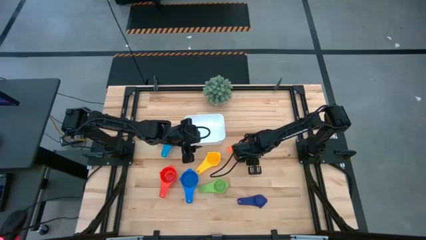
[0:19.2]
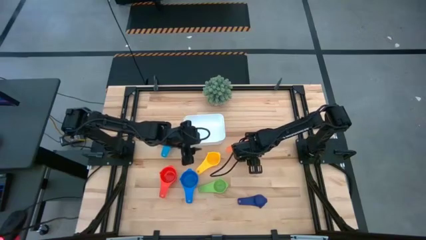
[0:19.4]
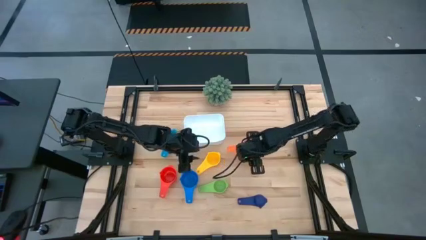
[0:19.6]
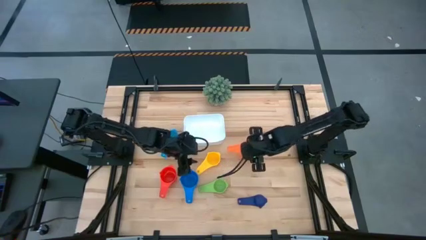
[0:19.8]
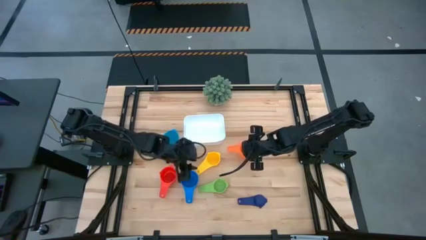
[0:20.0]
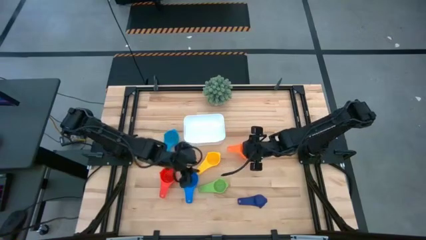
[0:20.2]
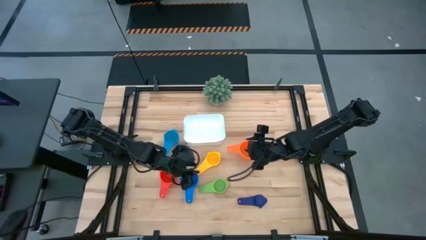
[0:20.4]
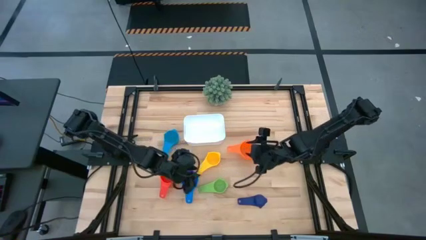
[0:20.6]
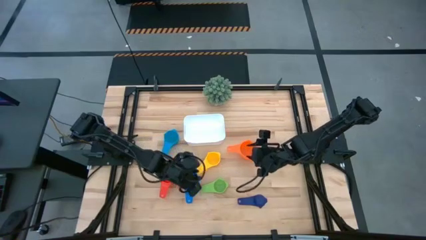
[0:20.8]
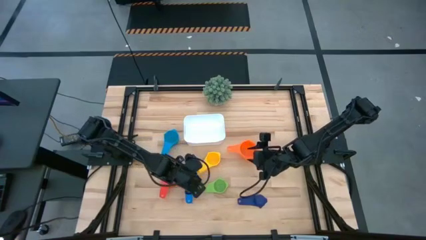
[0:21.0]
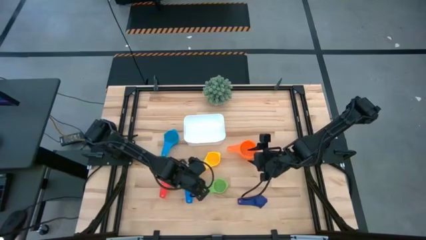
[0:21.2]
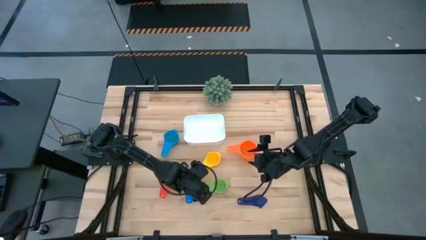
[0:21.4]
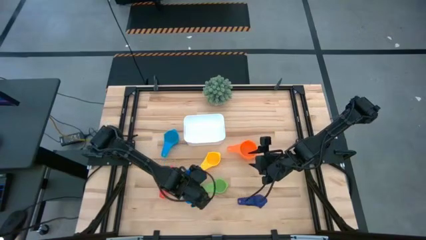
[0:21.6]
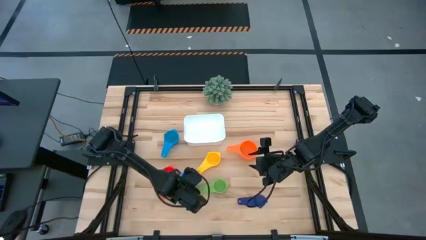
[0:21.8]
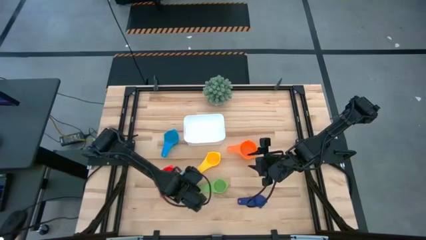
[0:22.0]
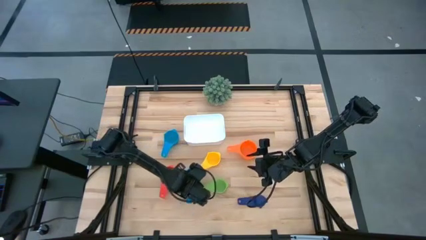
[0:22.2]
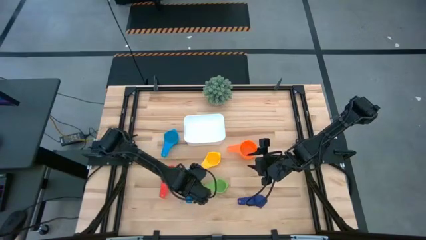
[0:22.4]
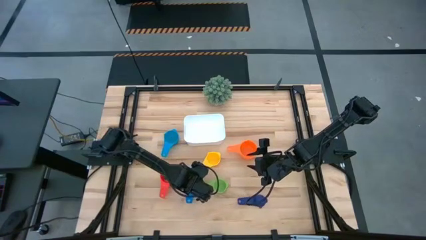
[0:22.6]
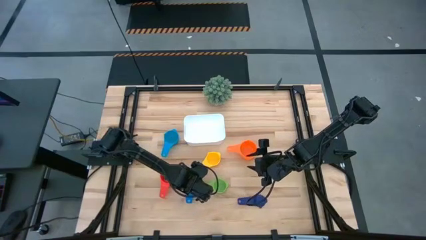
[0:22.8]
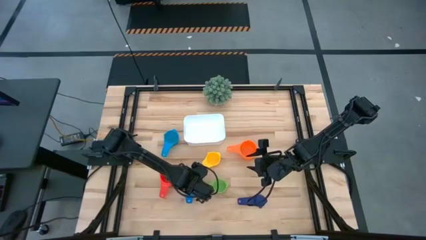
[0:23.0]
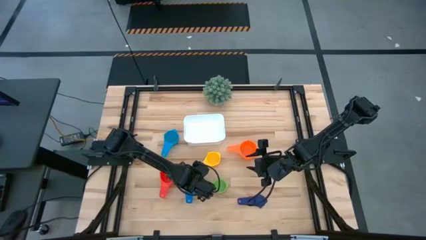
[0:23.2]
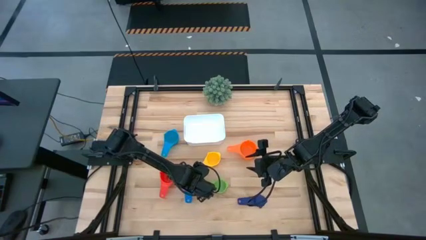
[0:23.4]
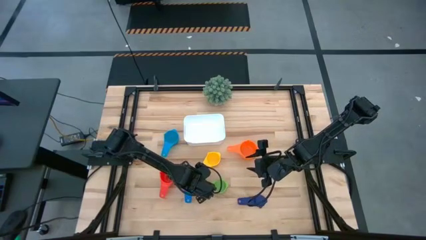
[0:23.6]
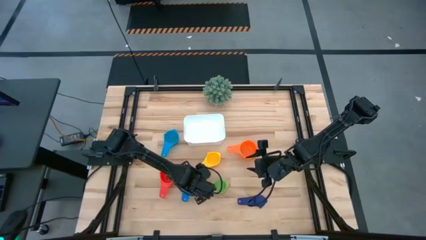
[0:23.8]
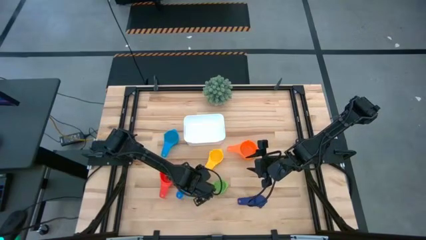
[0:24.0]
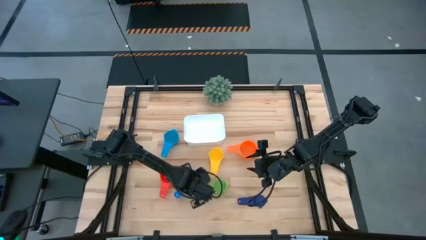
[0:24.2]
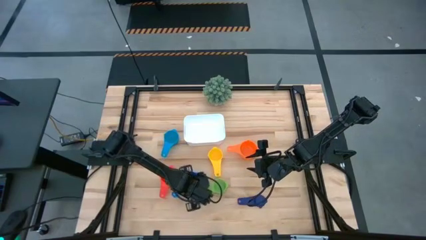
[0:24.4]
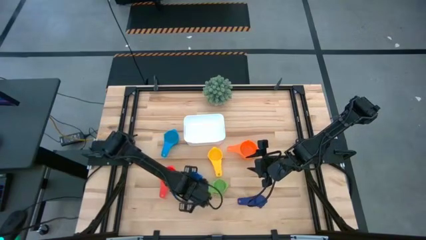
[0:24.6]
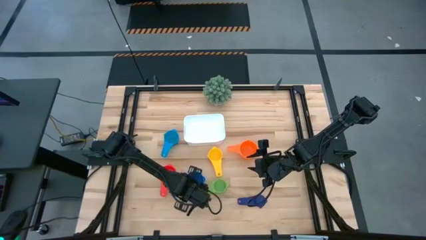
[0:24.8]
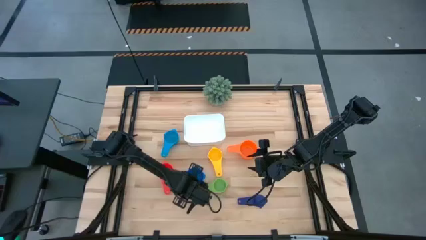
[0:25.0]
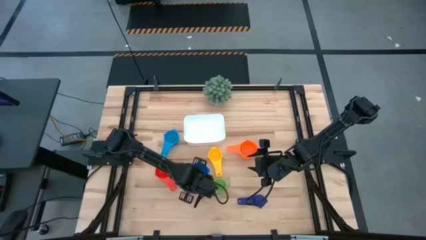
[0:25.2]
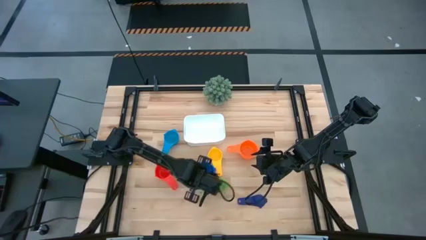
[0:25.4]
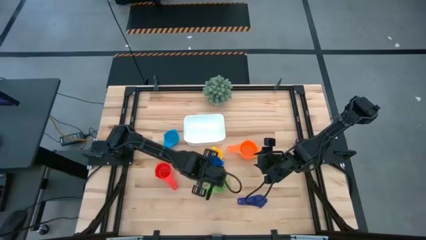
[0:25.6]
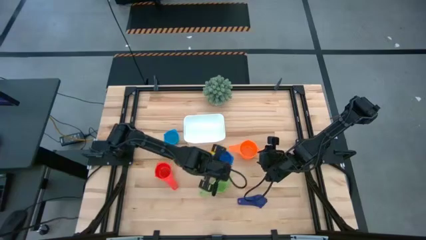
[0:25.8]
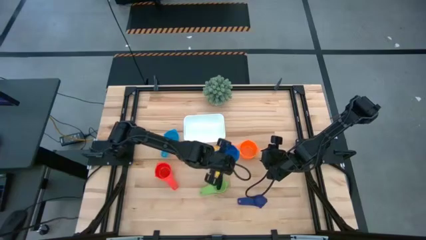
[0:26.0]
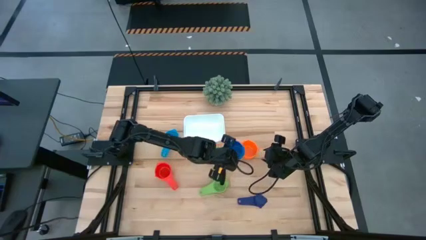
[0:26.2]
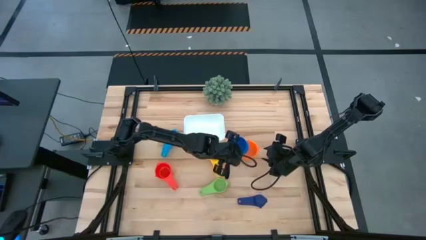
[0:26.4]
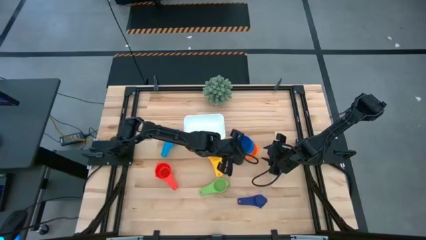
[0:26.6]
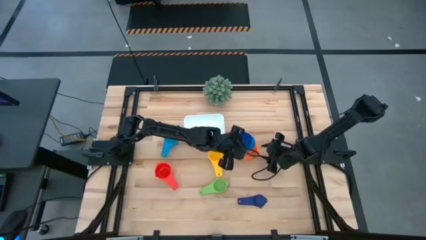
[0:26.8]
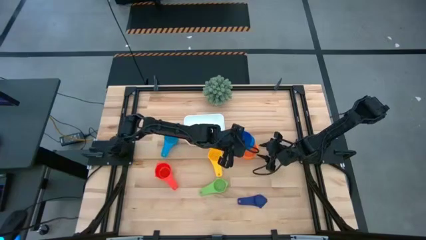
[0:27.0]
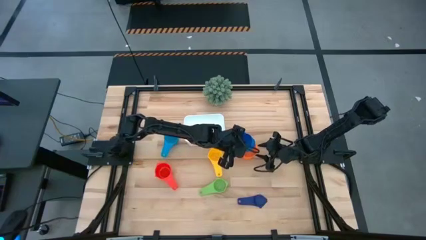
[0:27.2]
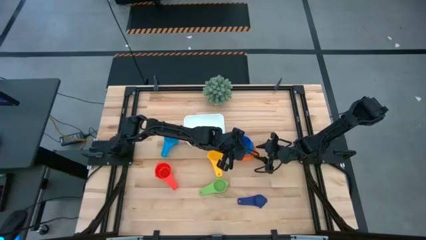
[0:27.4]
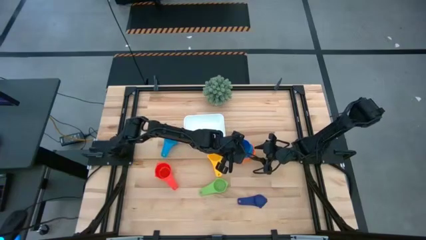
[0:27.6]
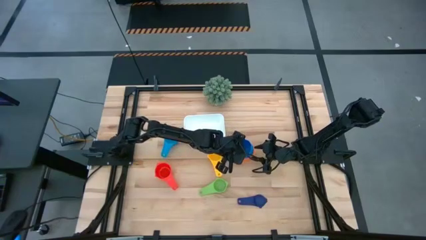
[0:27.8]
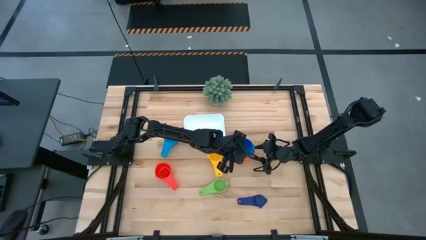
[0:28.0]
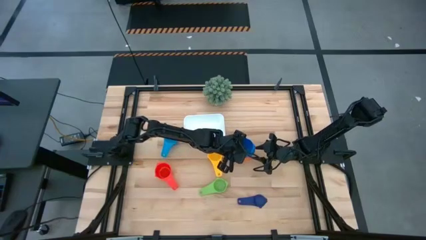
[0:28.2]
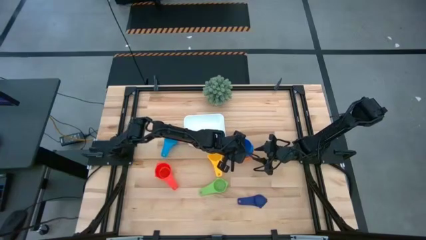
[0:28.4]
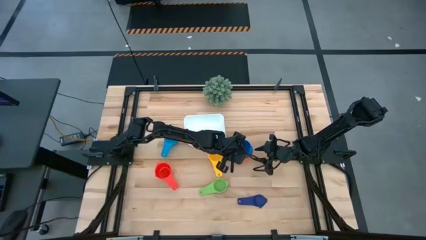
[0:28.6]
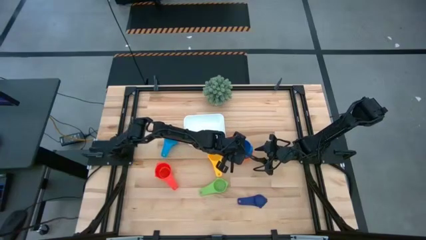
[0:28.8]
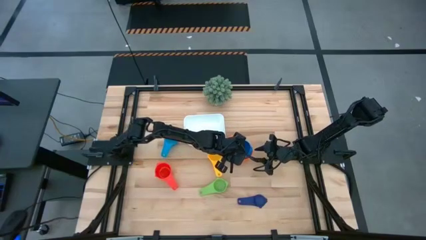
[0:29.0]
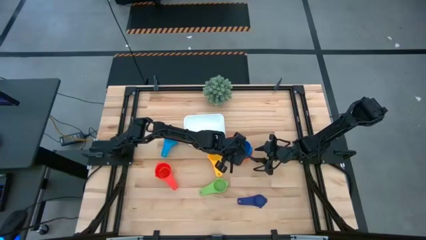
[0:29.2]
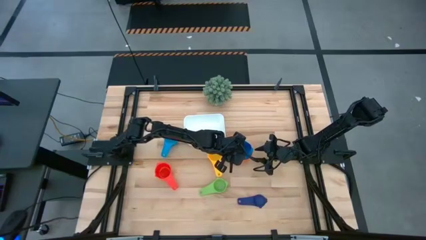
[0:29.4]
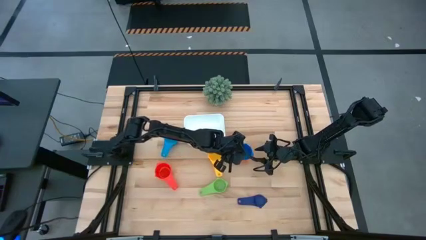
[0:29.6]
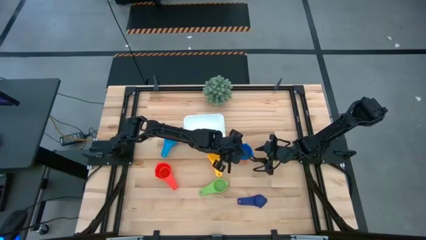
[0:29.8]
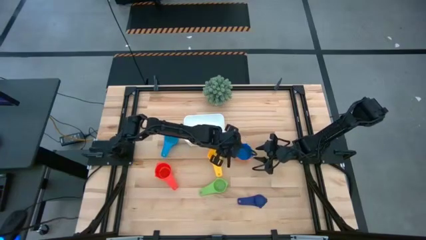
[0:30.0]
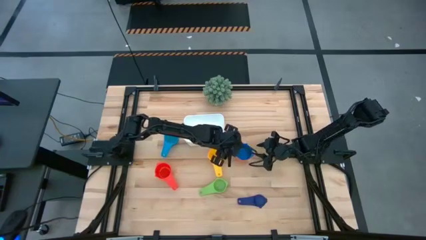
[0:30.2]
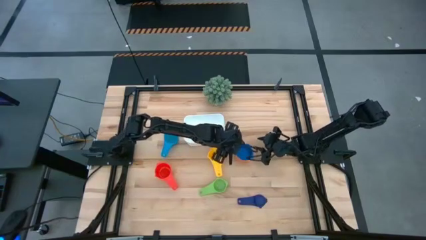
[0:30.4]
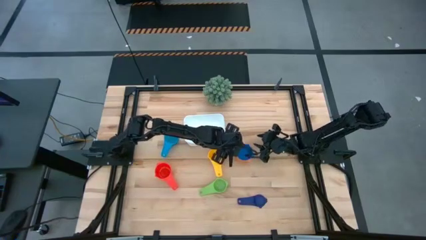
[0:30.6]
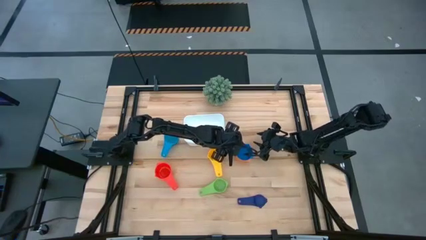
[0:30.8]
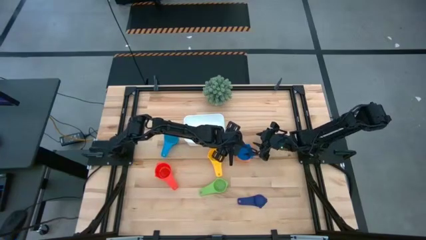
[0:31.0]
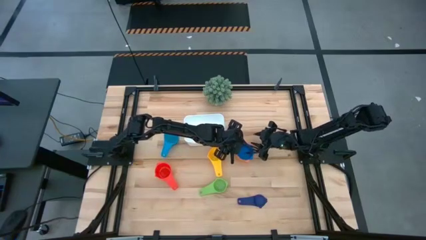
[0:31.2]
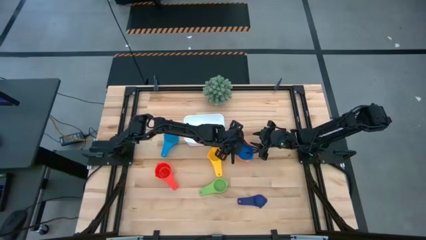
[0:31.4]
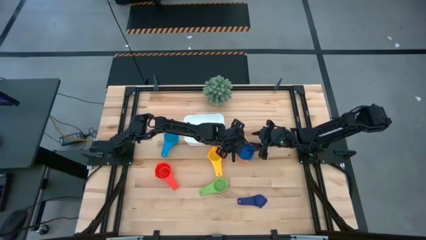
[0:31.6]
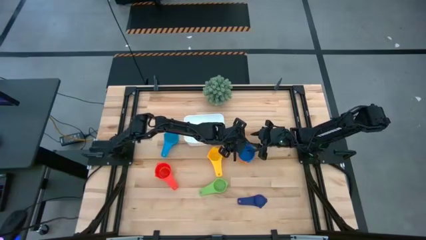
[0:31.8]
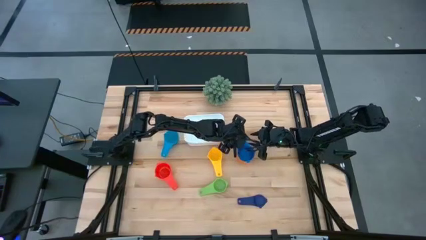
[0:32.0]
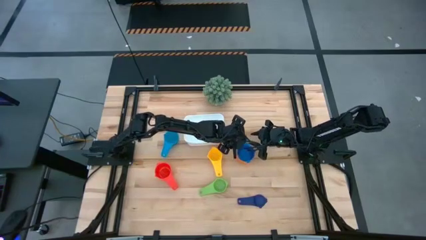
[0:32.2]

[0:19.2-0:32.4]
Task: Nest measuring cups in basket
Stack the blue nesting cup on the orange nesting cup

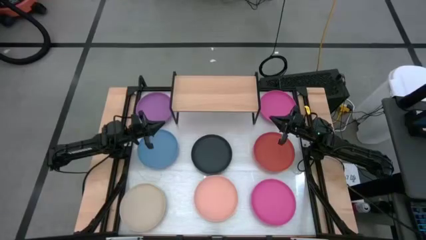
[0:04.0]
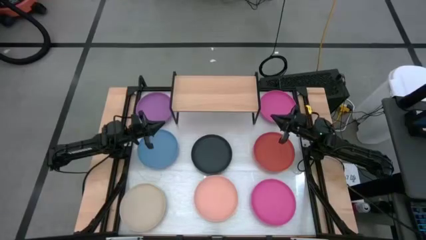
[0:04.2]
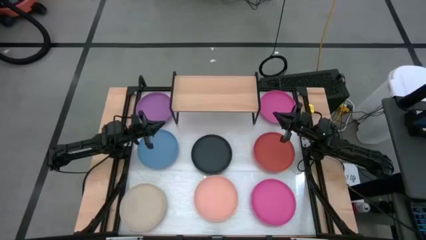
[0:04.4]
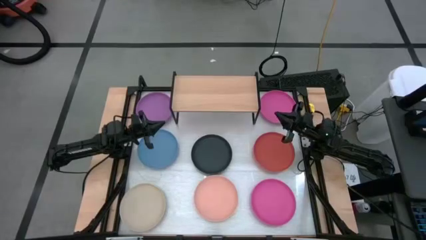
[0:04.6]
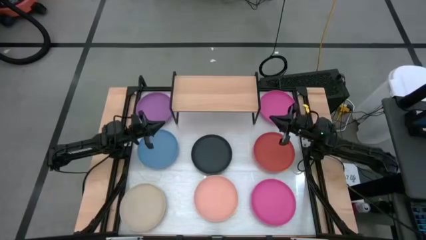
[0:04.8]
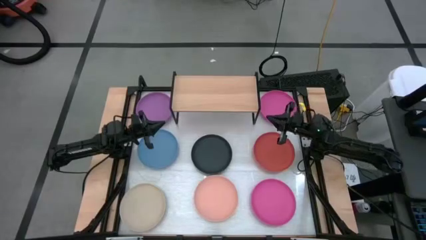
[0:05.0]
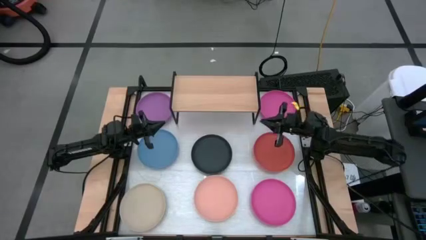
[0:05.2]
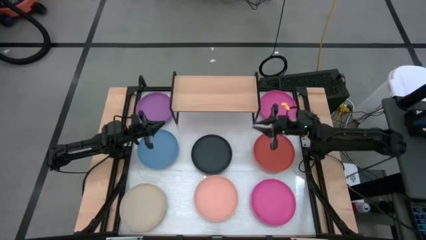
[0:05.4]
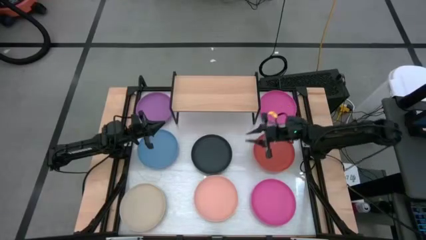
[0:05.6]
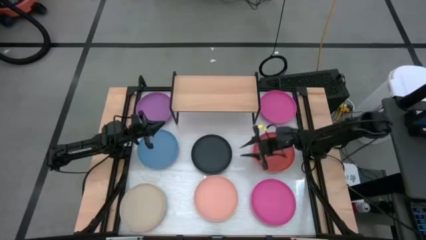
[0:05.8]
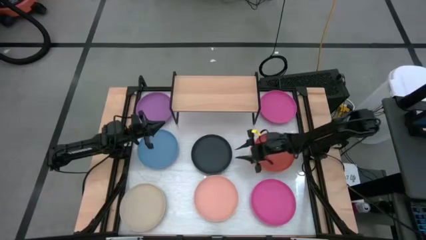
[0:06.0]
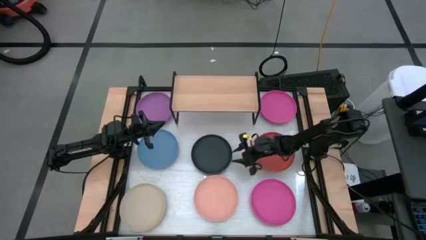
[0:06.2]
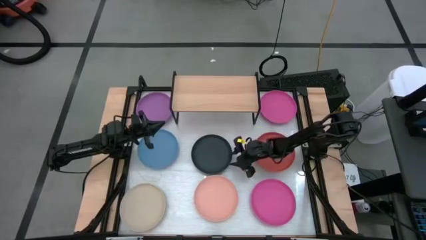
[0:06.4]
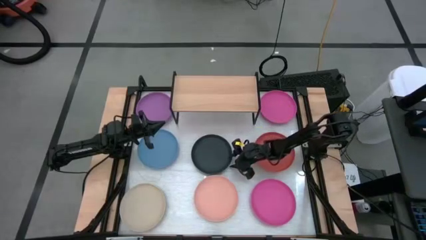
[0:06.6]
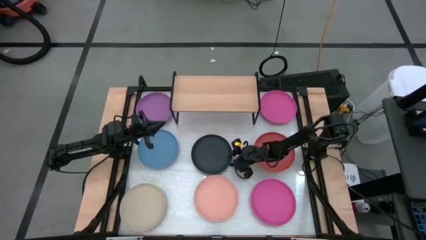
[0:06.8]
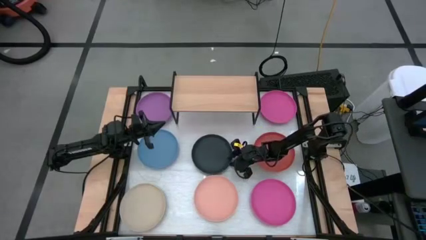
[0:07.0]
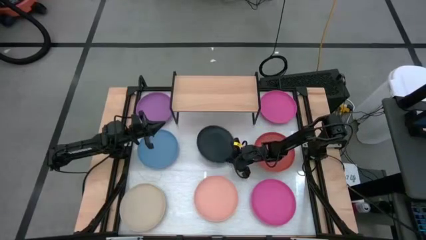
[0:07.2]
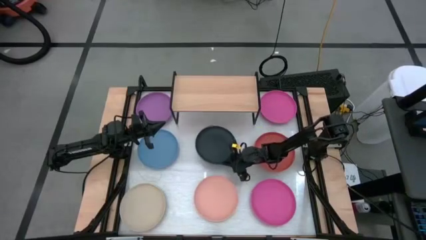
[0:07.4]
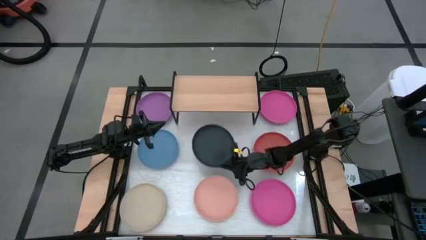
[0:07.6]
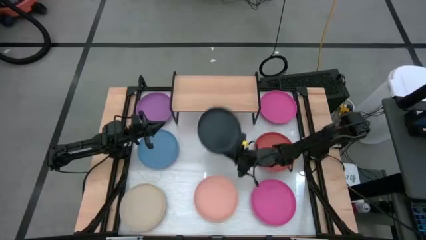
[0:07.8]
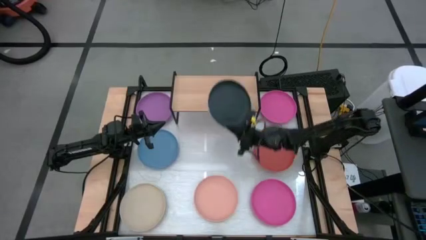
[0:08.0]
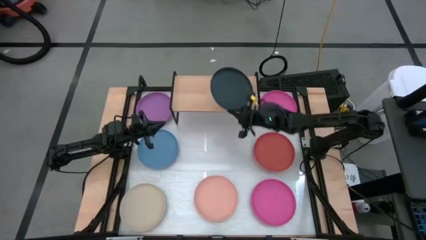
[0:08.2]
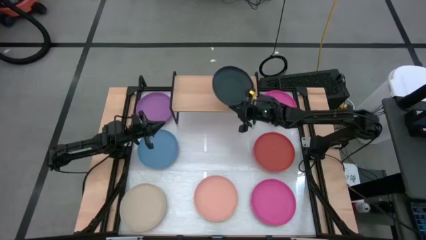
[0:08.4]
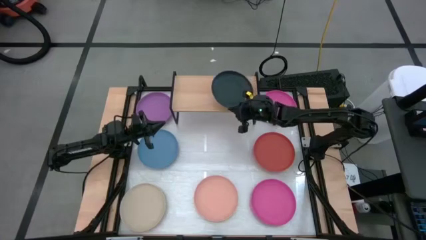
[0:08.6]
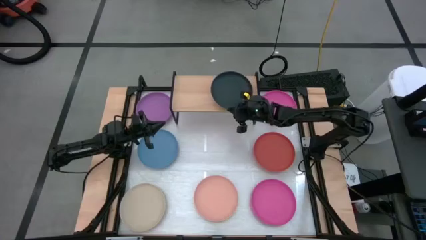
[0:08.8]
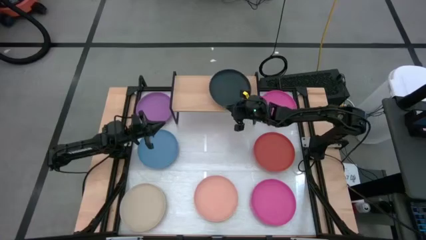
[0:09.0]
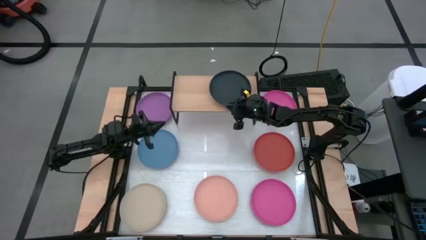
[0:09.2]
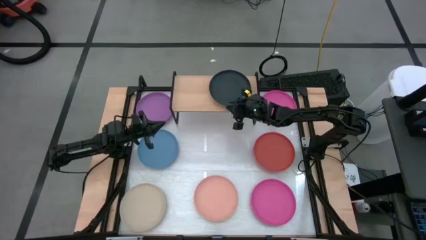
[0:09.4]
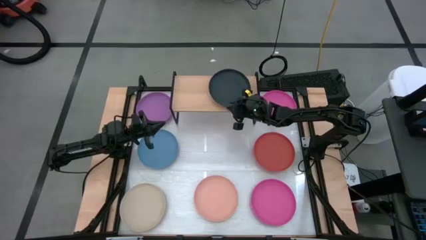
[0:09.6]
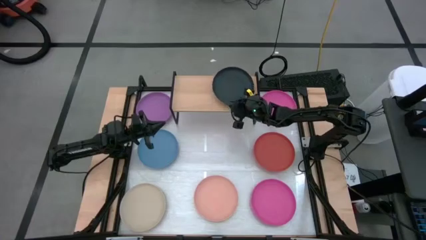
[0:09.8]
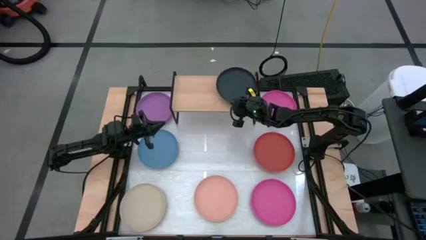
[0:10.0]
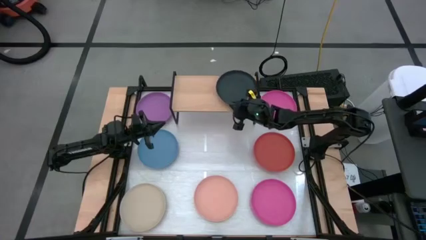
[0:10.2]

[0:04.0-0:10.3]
Task: Place and stack plates onto a shelf
Put the black plate on the shelf
